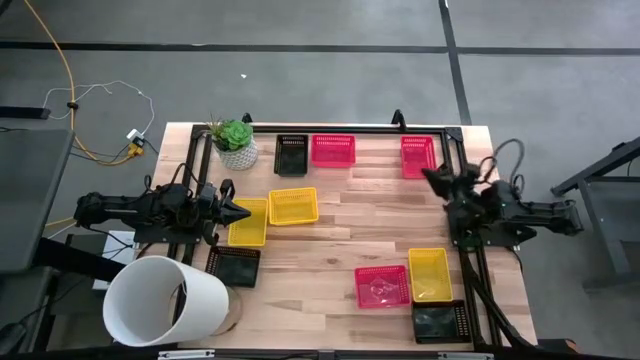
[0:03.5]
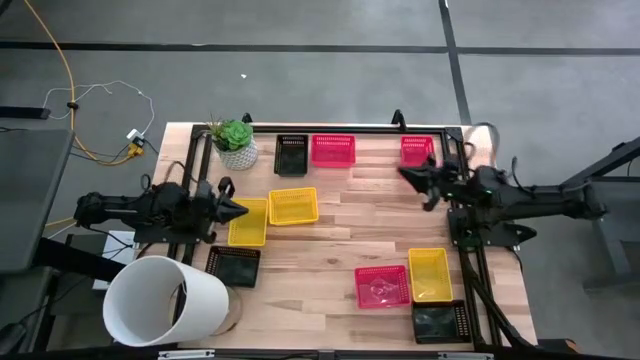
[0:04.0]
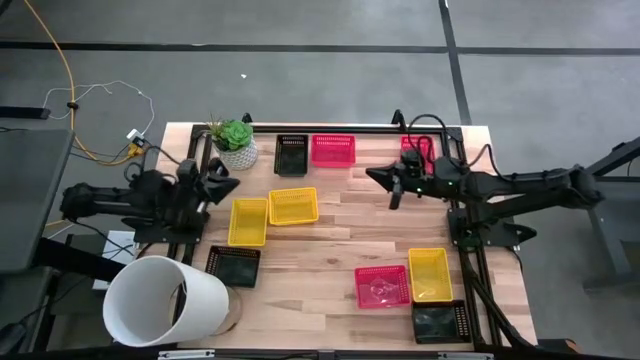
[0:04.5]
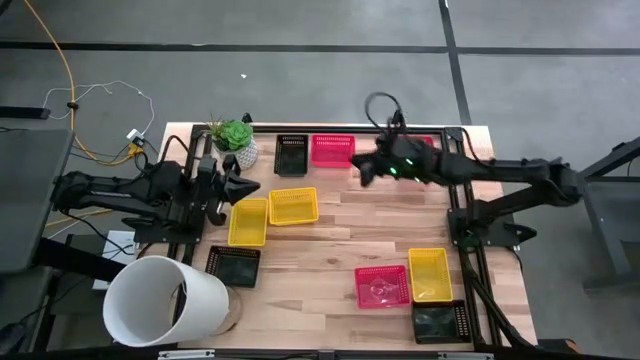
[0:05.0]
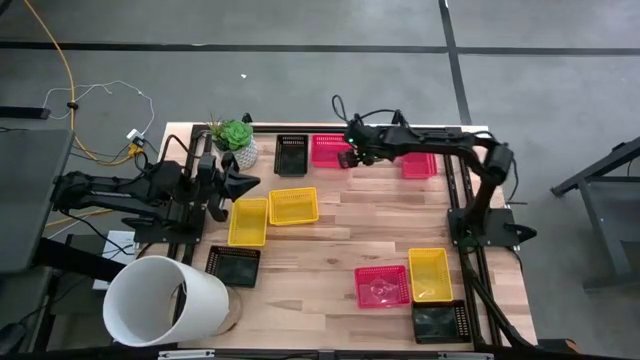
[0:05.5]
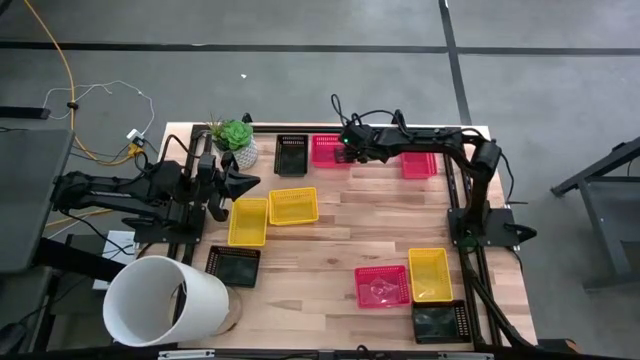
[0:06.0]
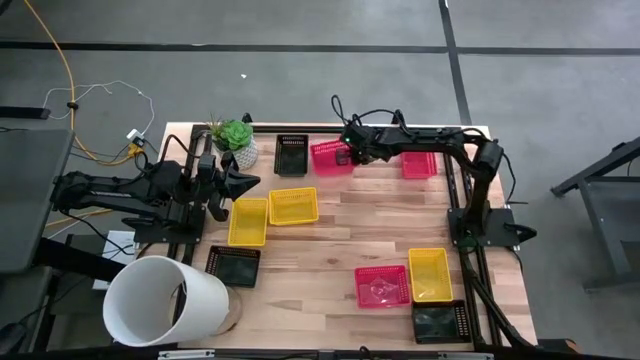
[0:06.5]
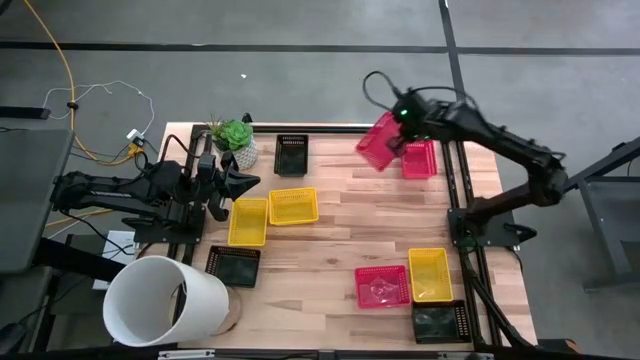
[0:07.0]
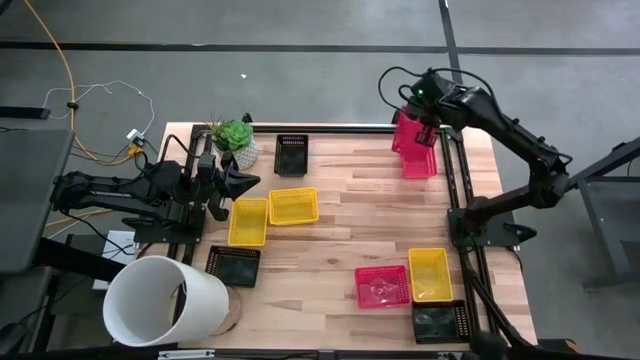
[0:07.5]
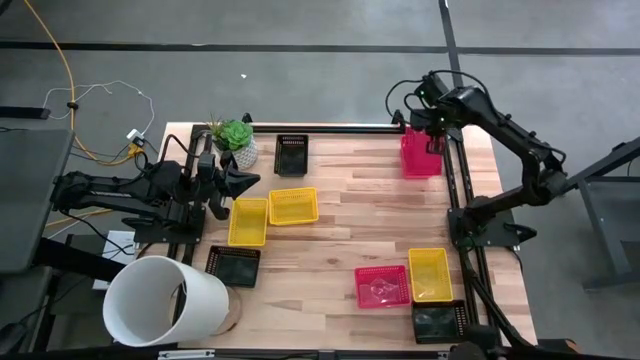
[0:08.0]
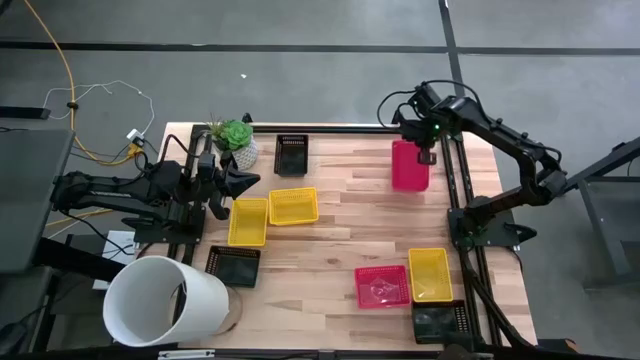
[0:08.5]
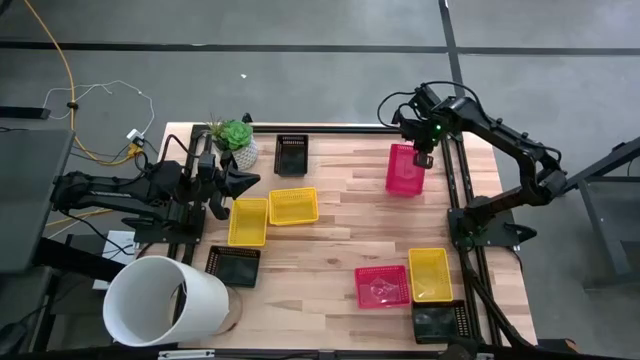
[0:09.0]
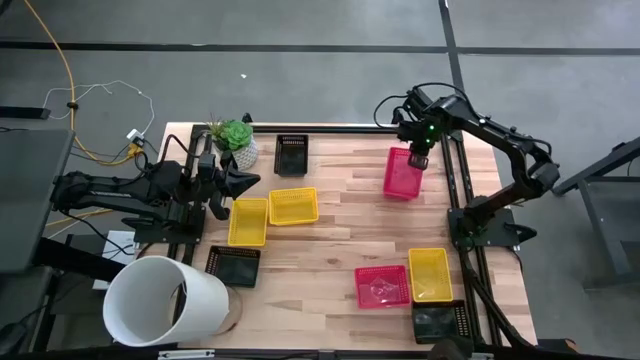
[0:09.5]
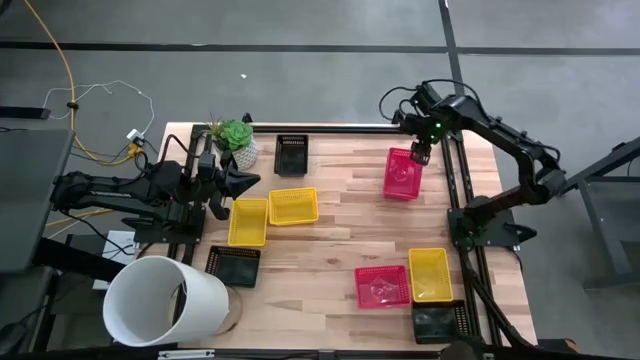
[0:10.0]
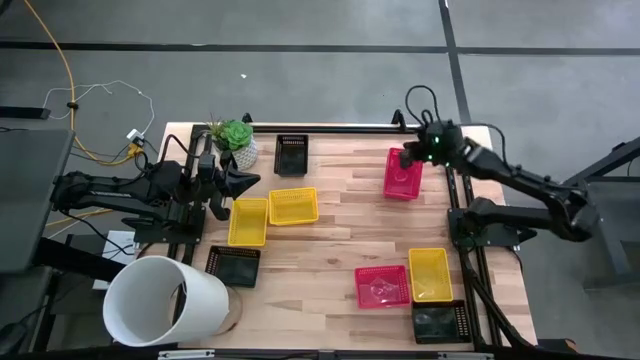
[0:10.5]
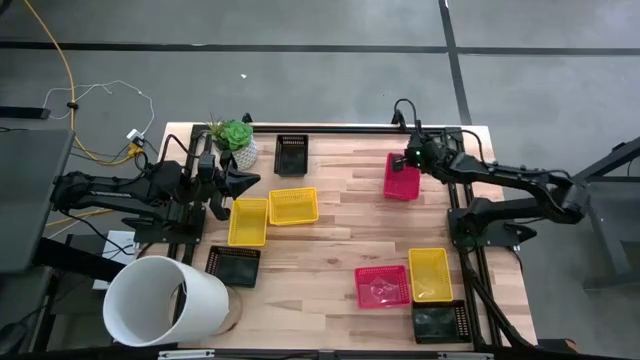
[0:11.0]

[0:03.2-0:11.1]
Stack the top red bin on top of the red bin

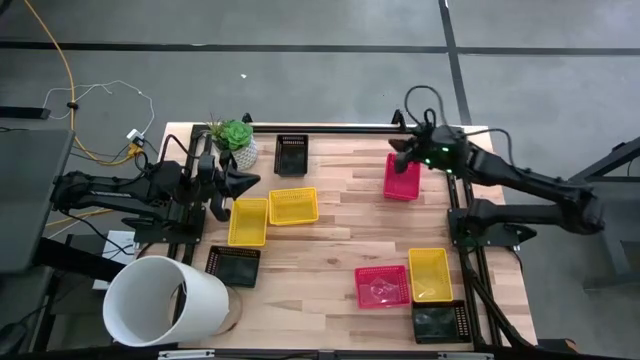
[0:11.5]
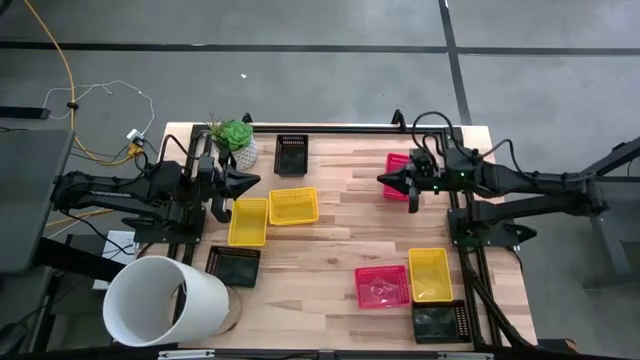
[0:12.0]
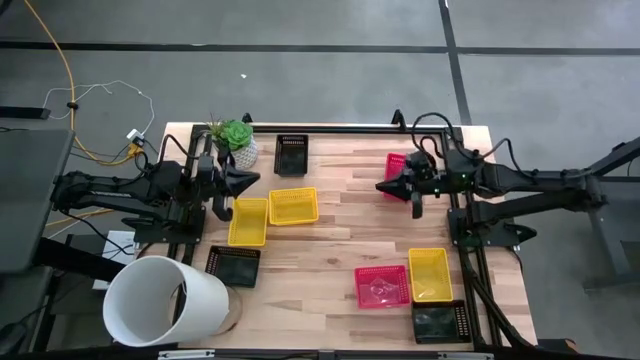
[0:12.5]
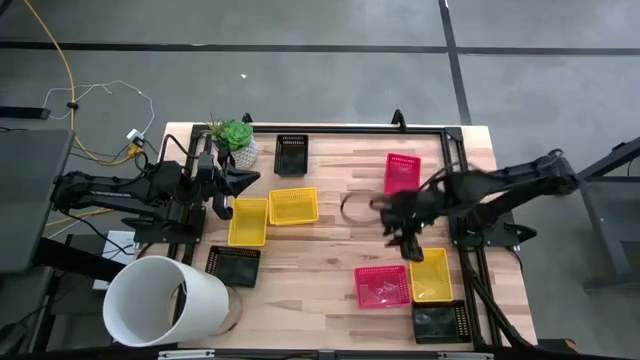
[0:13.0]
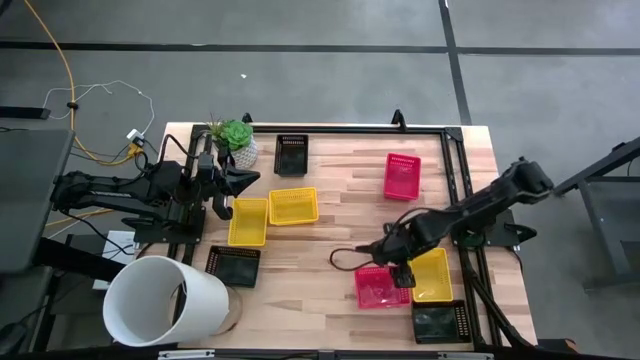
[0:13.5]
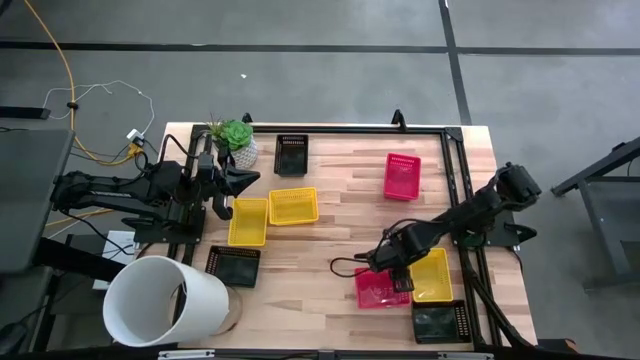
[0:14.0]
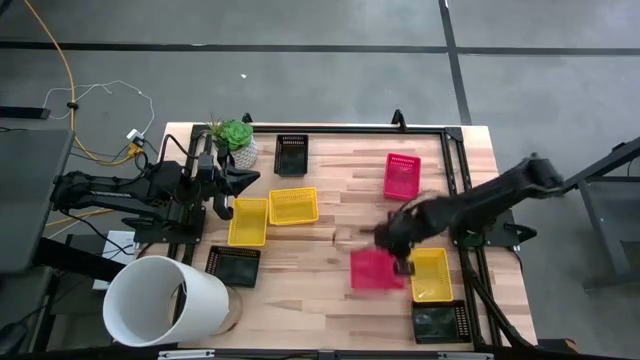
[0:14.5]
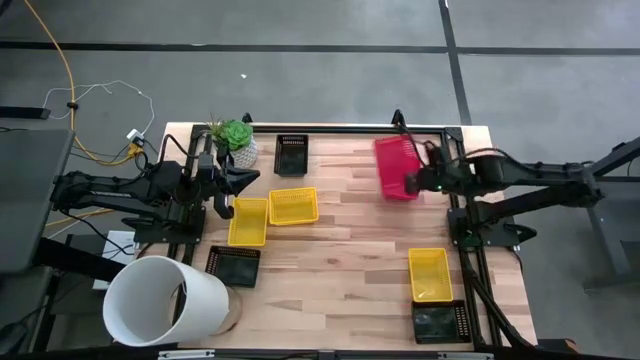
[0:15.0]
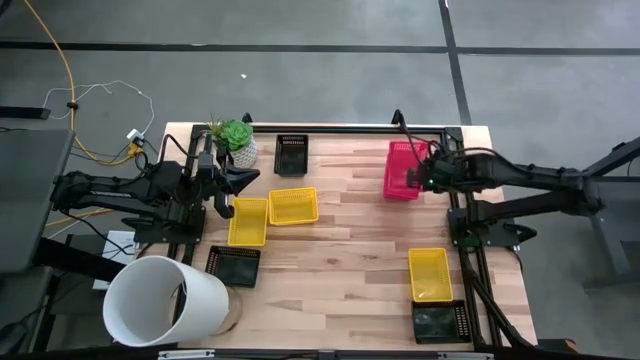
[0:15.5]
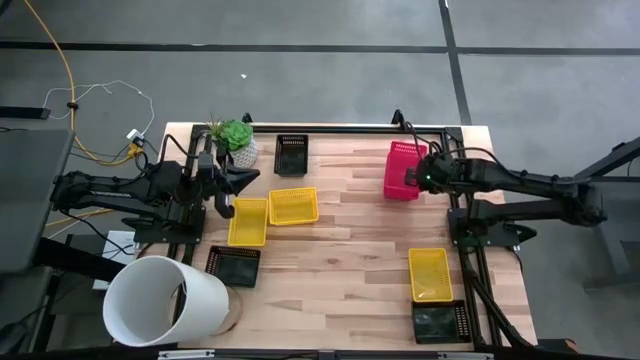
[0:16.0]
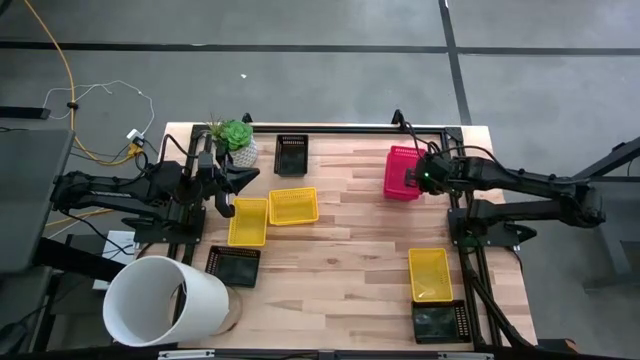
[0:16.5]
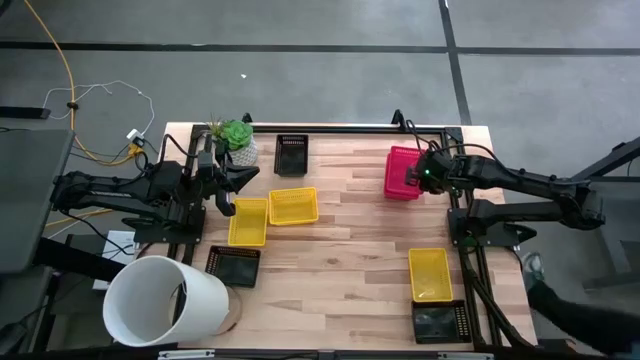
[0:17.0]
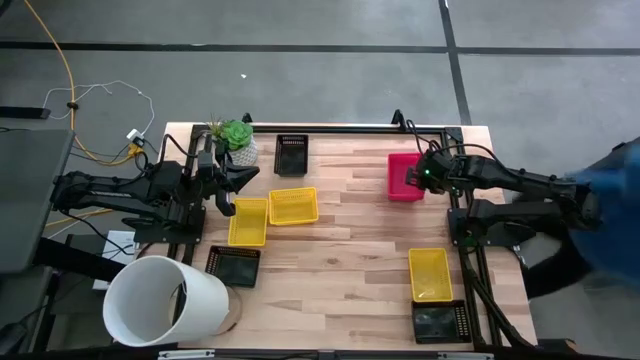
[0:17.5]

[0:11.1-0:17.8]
Stack the red bin on top of the red bin

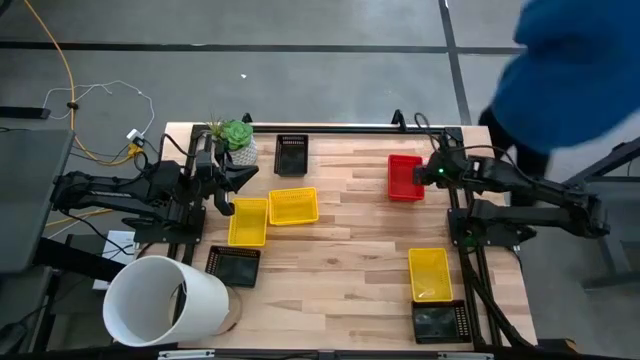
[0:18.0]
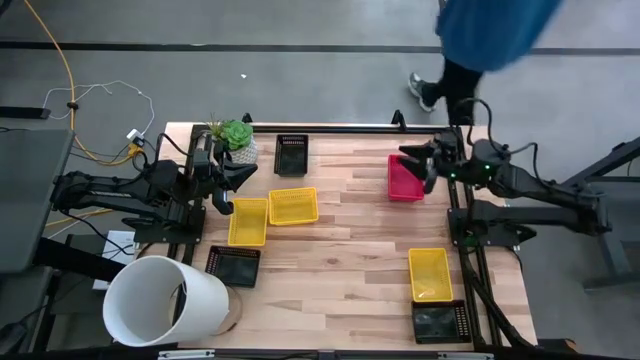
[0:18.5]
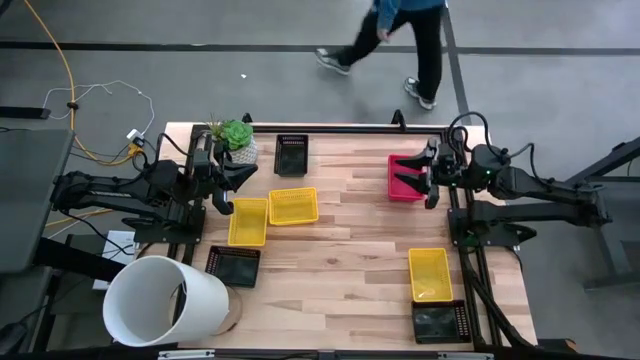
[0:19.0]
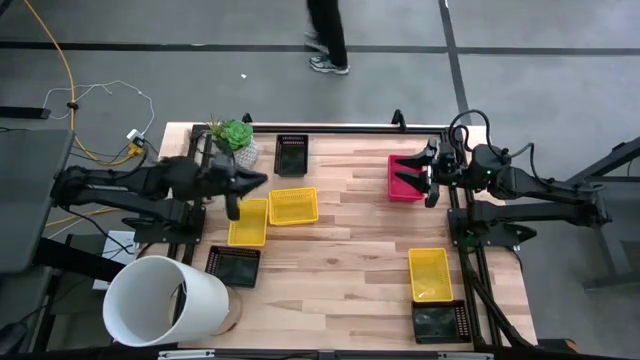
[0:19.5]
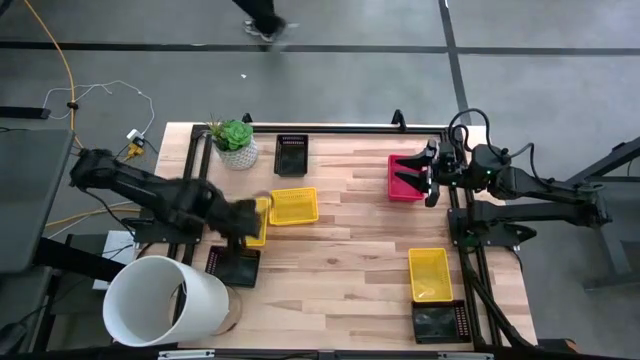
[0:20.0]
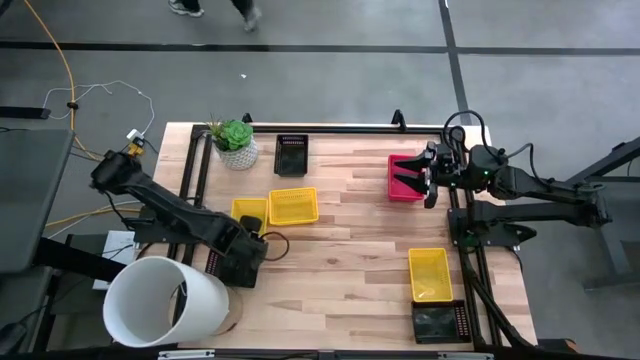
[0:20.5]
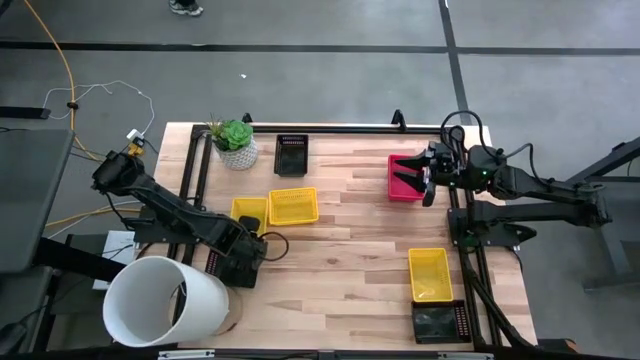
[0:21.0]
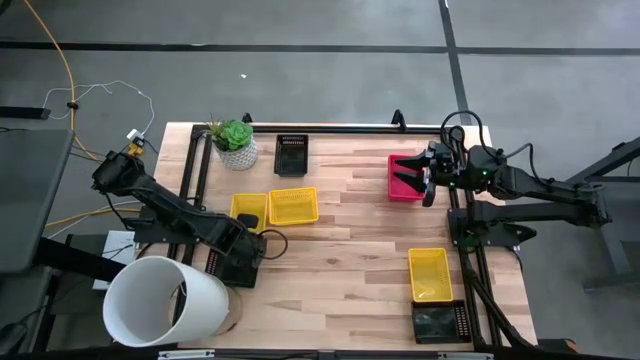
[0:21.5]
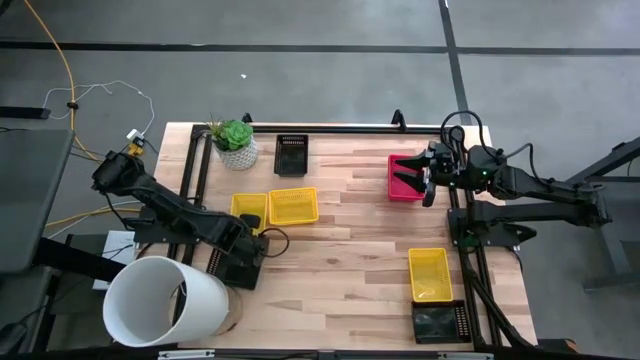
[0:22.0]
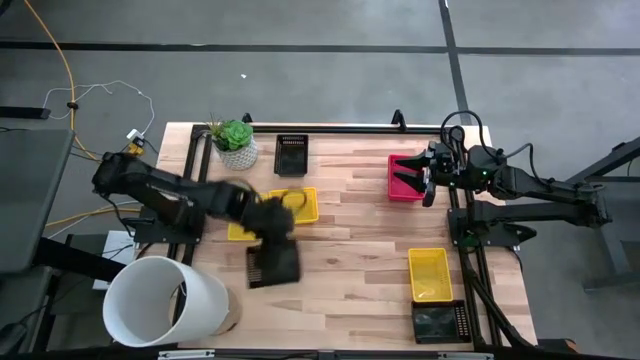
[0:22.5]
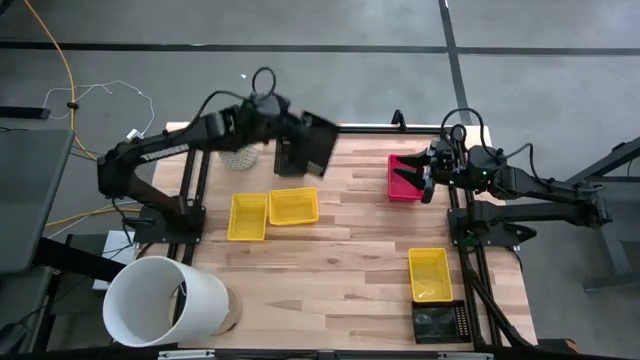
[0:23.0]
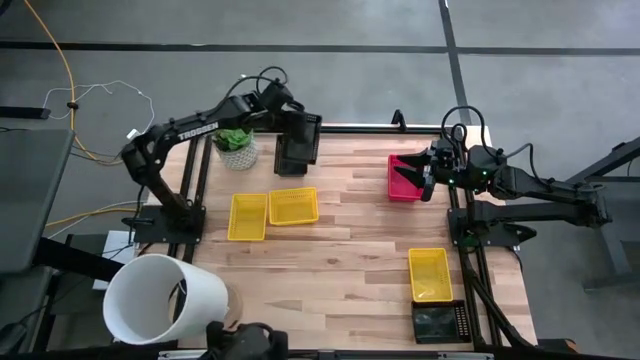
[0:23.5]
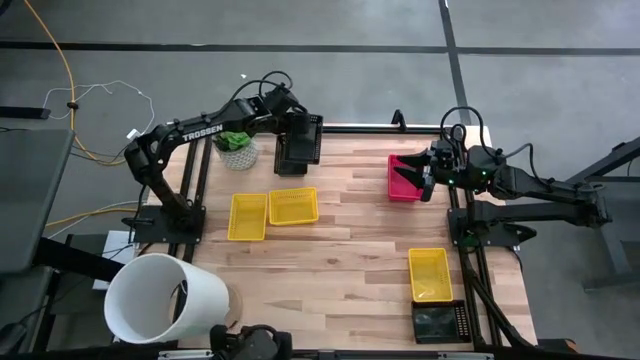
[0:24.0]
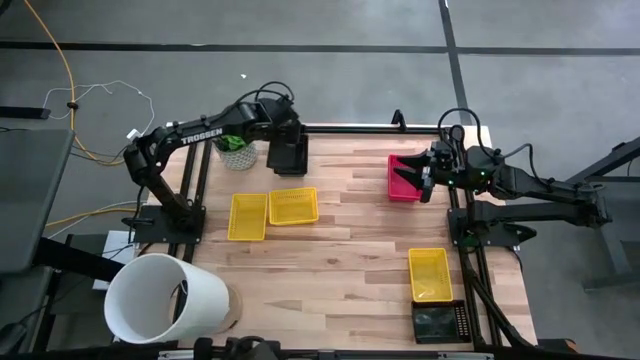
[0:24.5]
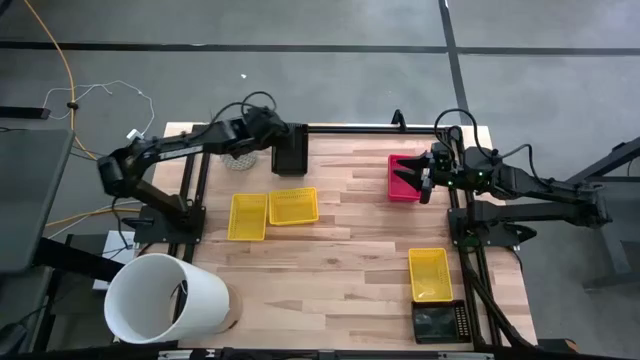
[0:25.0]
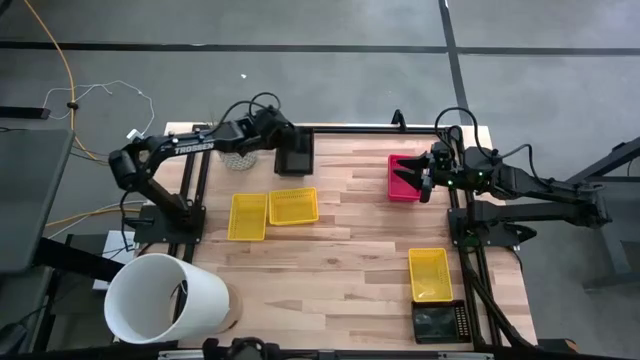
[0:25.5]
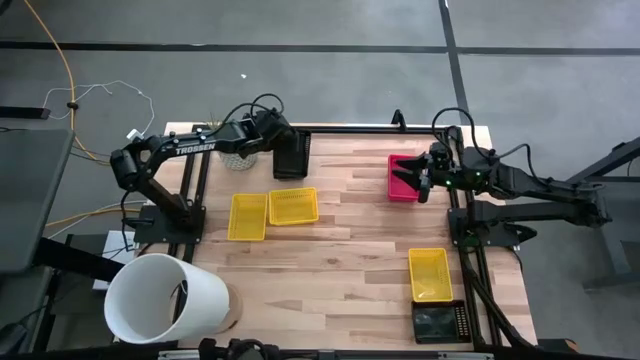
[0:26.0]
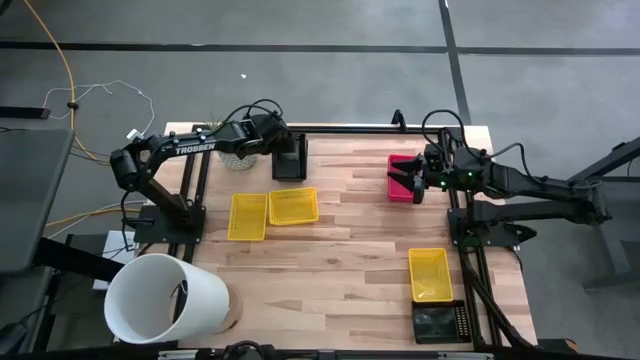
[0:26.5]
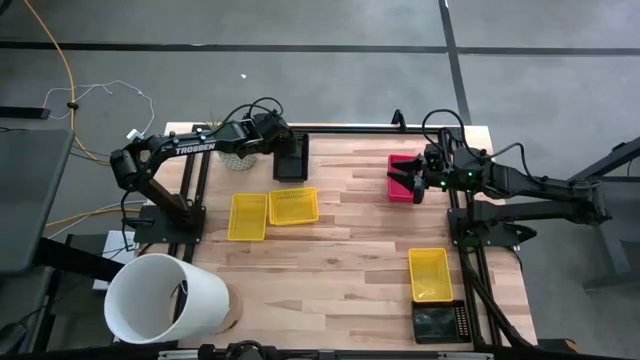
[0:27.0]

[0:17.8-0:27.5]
Stack the top black bin on top of the black bin
